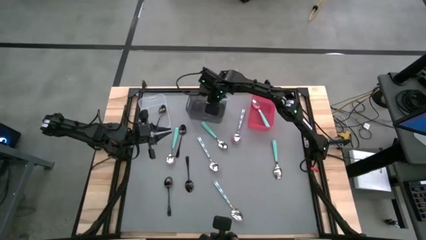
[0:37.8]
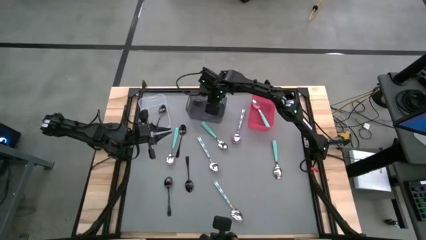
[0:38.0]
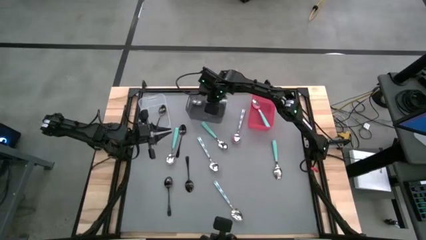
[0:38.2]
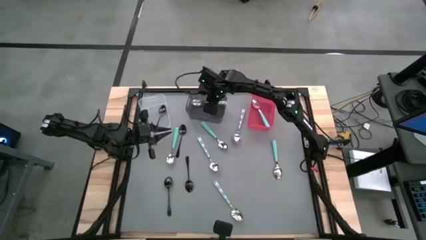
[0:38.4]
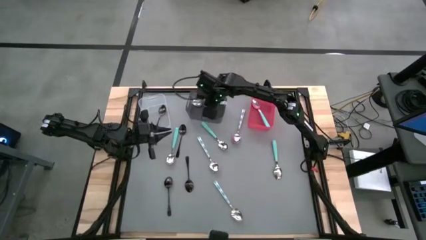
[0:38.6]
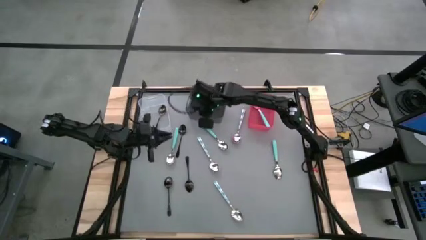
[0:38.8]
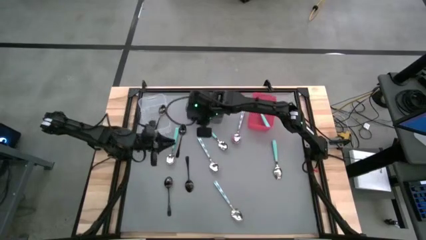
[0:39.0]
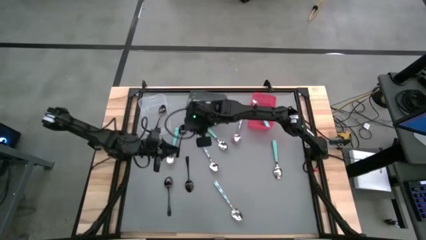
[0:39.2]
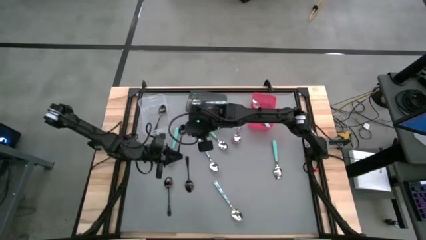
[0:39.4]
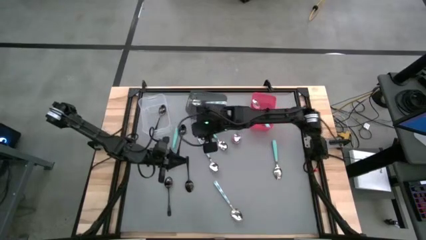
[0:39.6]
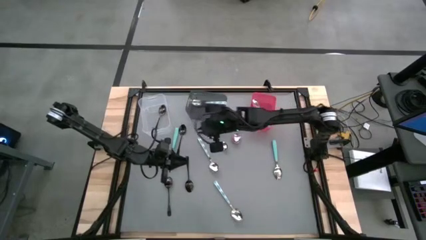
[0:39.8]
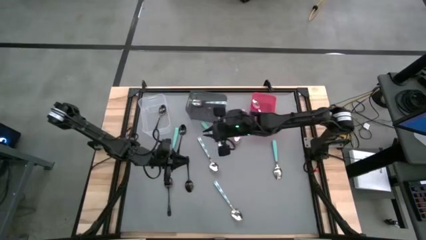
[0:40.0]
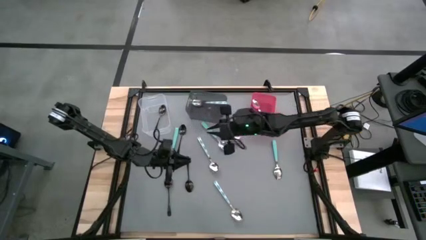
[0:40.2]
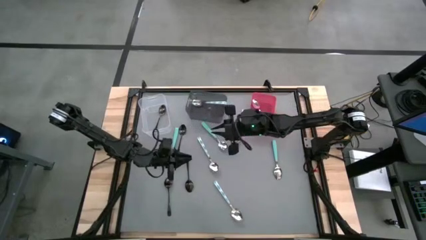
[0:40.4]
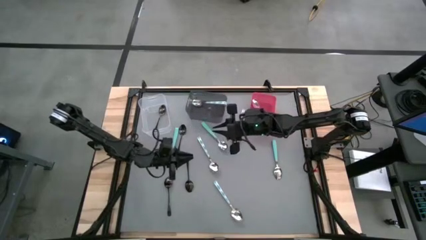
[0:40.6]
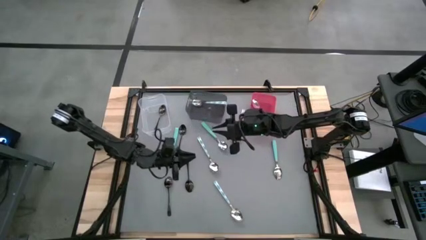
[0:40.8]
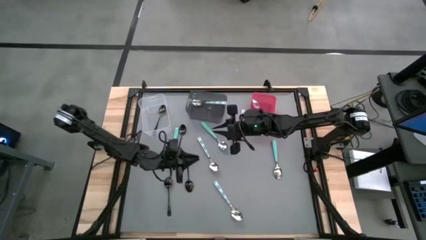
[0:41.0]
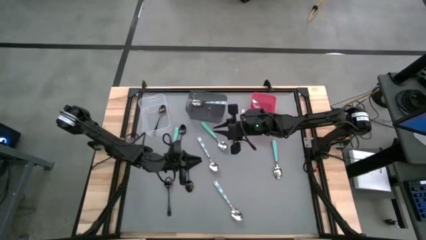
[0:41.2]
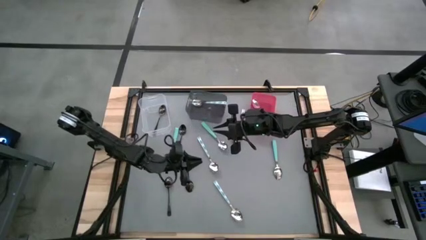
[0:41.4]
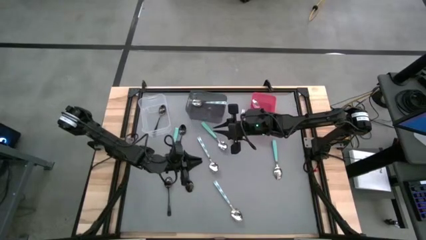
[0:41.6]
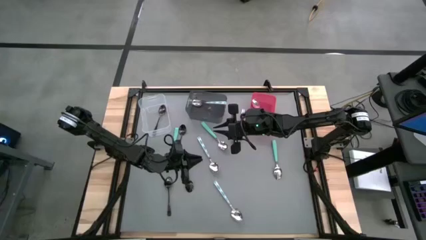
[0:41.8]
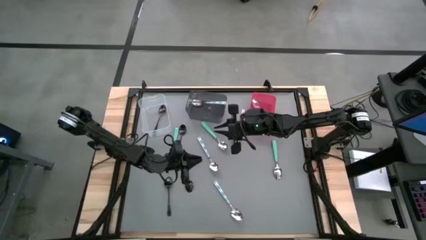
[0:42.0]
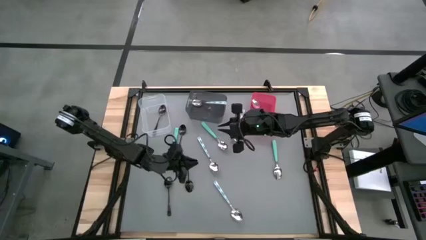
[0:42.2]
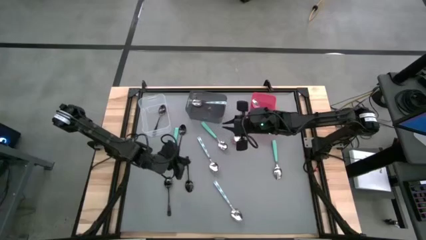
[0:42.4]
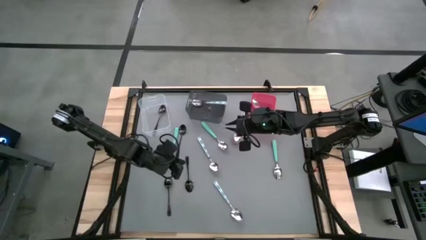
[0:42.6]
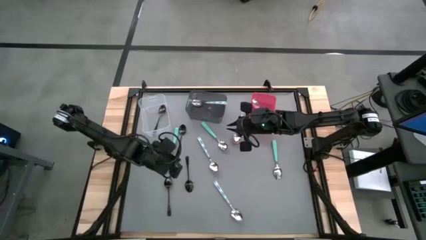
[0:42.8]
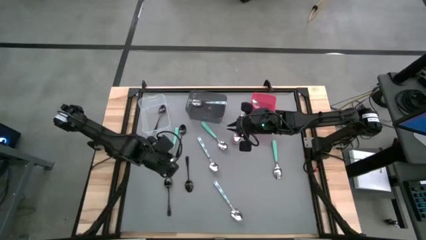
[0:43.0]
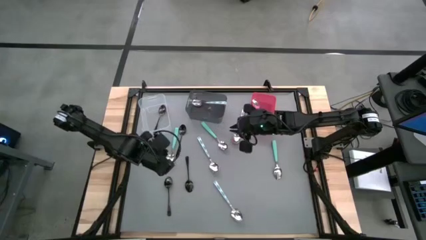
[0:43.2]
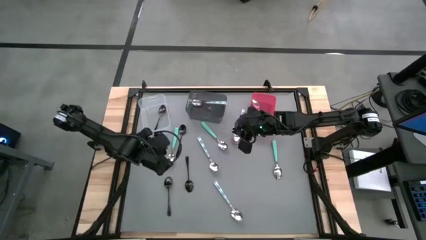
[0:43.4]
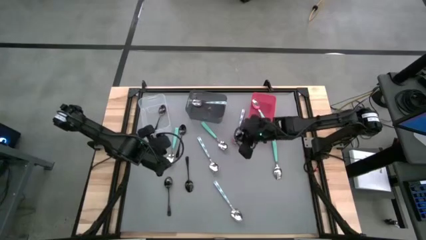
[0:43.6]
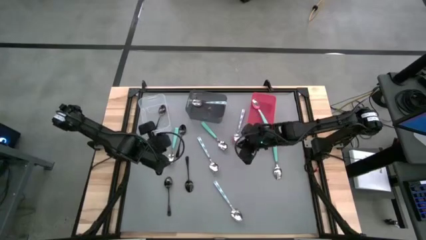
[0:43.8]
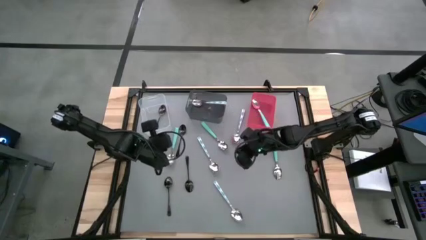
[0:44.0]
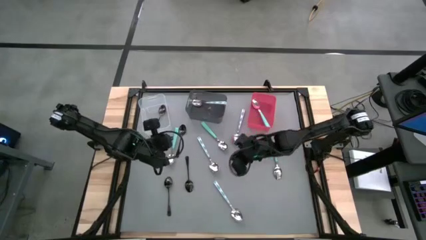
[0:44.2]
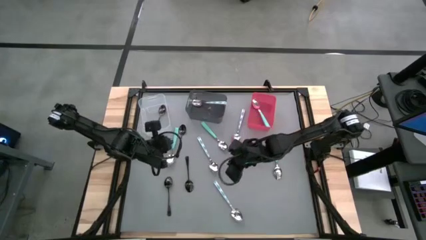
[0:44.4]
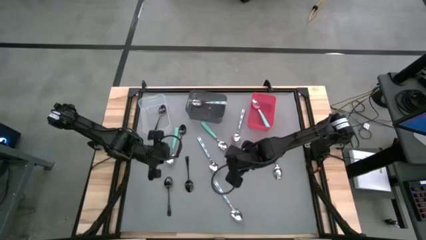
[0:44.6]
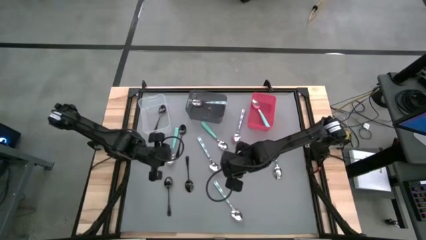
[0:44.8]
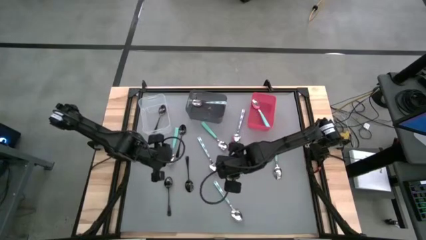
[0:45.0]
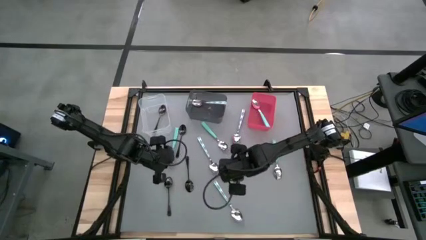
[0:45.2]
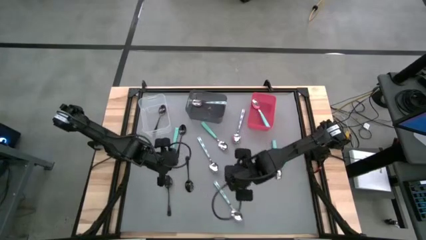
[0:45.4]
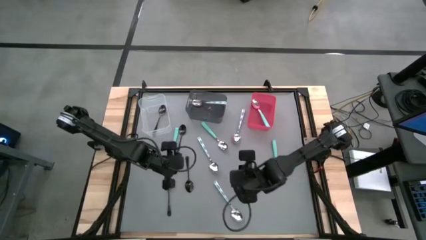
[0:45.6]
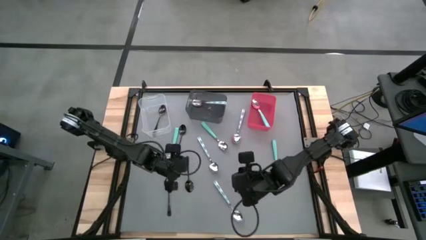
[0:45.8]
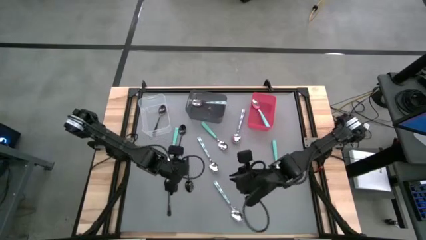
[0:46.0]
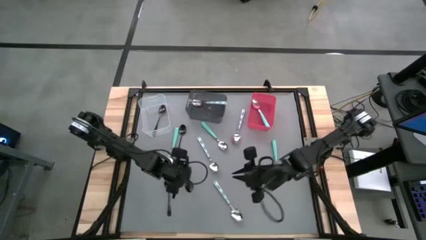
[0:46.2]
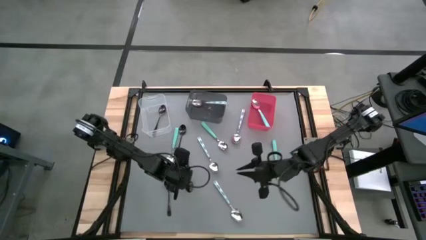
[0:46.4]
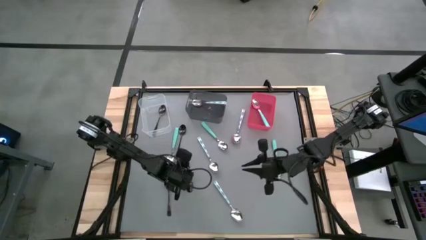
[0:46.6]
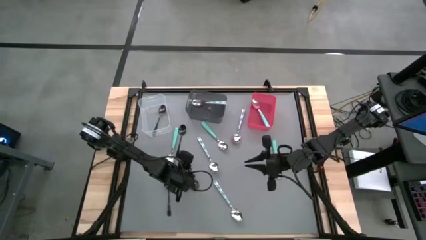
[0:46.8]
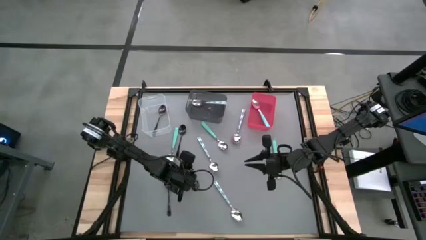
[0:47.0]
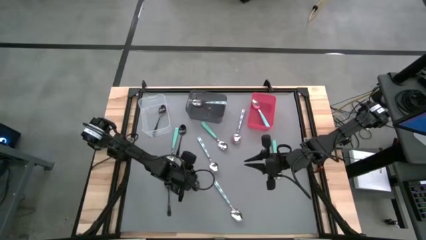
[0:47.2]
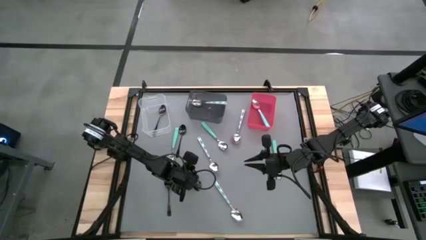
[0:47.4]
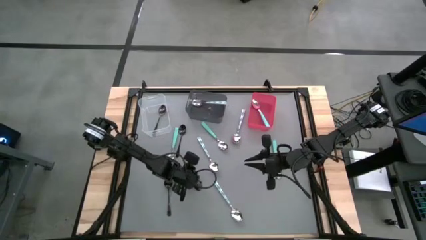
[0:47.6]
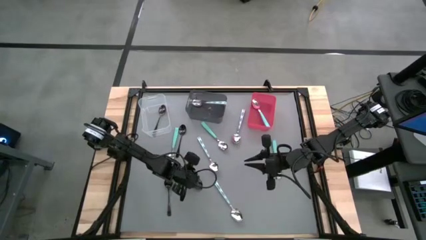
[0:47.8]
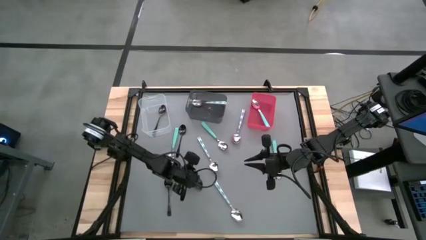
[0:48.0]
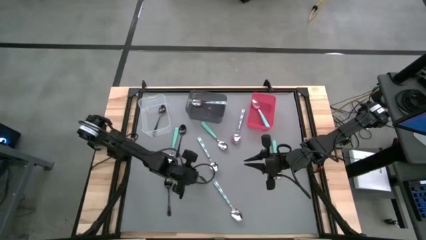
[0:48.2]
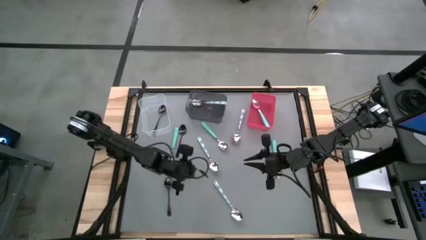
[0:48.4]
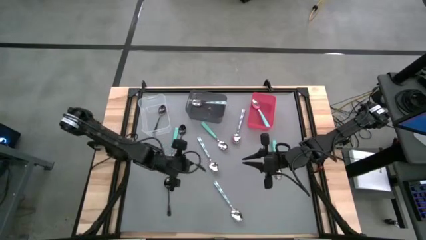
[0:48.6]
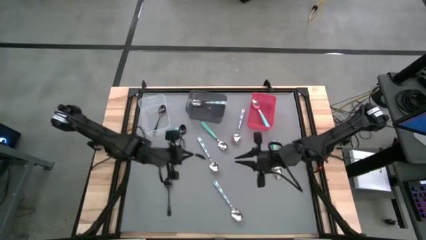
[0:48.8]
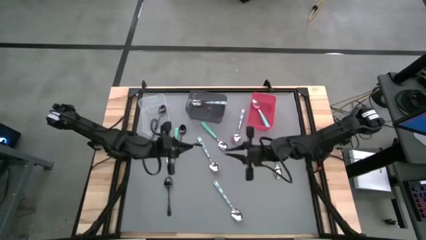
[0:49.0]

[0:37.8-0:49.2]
Task: Sort silverware by color (type)
Put the middle black spoon into the transparent bin

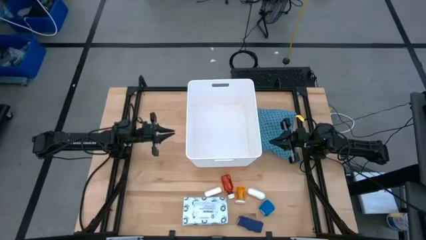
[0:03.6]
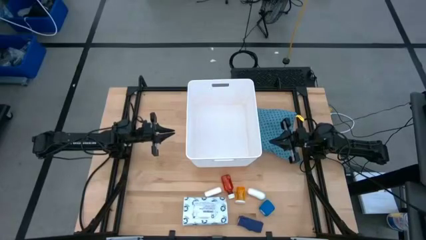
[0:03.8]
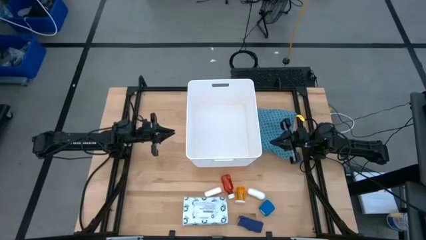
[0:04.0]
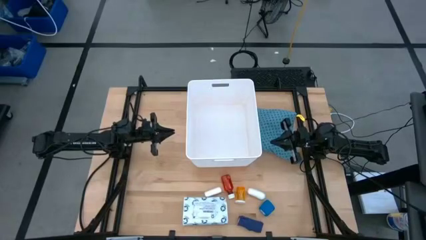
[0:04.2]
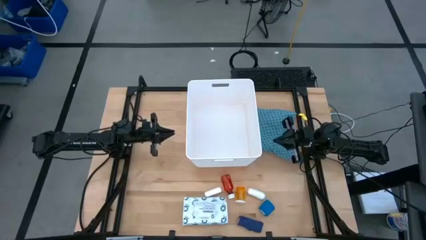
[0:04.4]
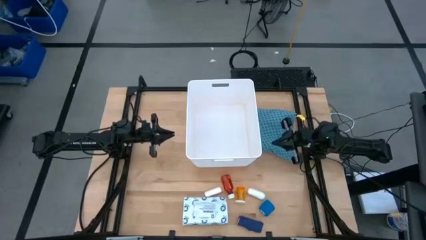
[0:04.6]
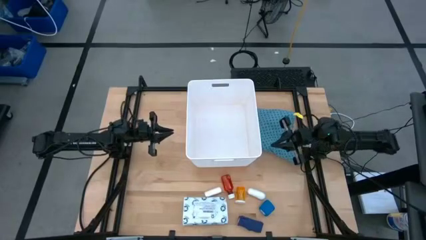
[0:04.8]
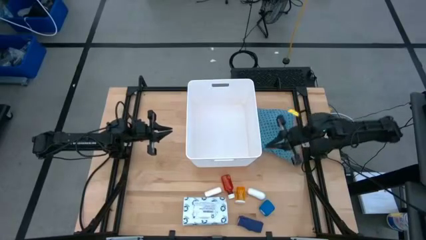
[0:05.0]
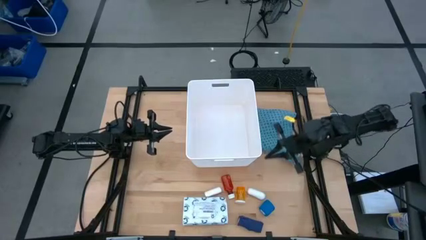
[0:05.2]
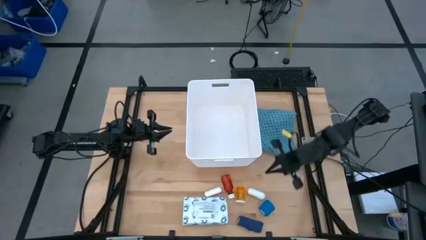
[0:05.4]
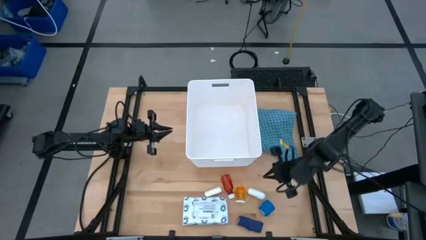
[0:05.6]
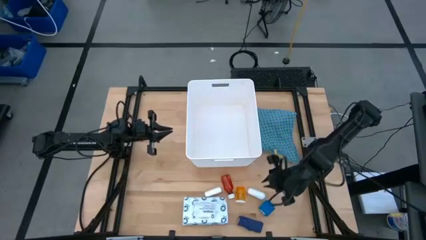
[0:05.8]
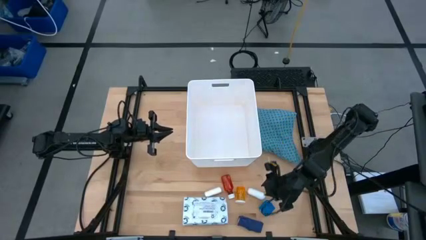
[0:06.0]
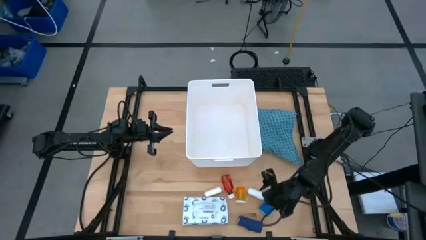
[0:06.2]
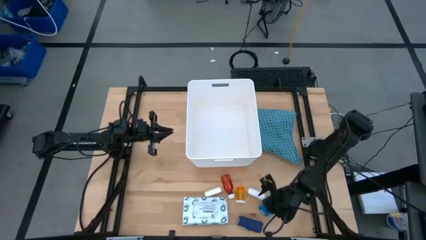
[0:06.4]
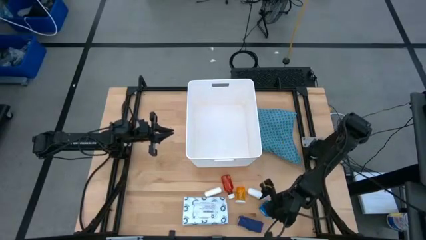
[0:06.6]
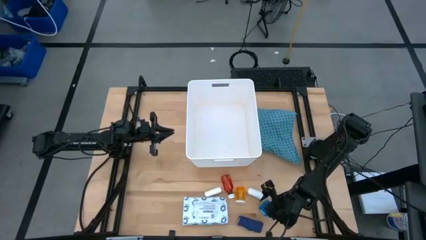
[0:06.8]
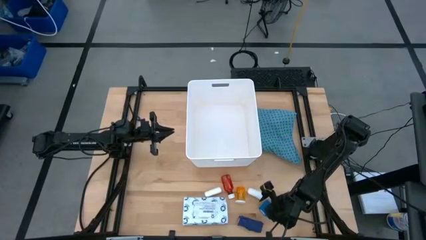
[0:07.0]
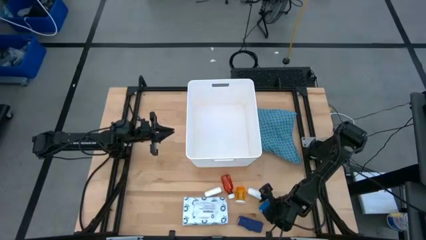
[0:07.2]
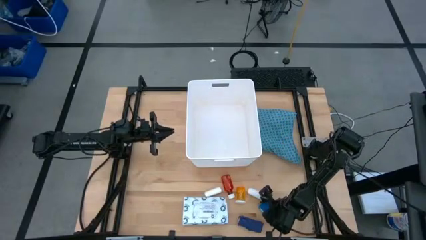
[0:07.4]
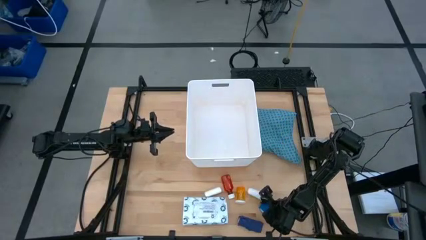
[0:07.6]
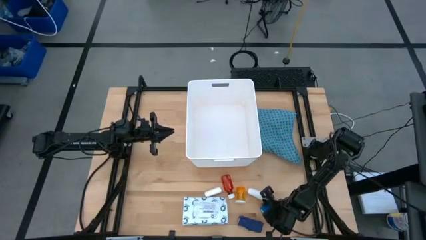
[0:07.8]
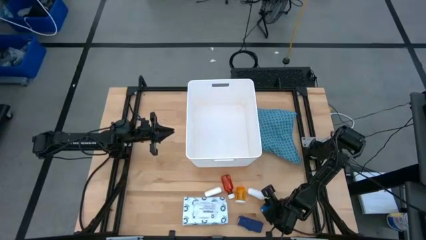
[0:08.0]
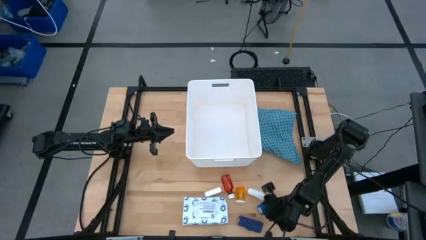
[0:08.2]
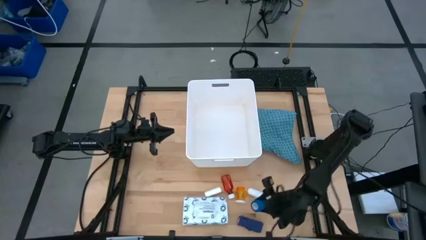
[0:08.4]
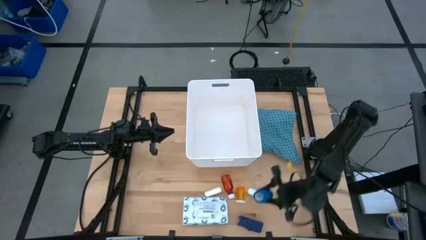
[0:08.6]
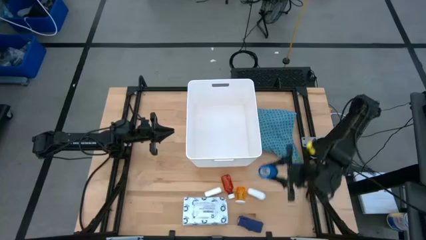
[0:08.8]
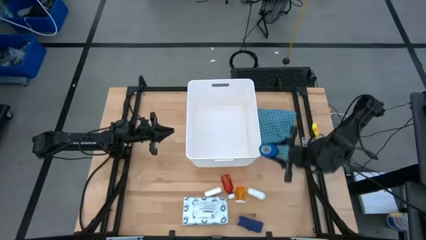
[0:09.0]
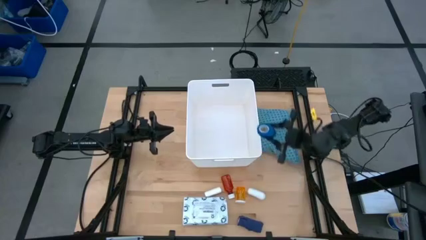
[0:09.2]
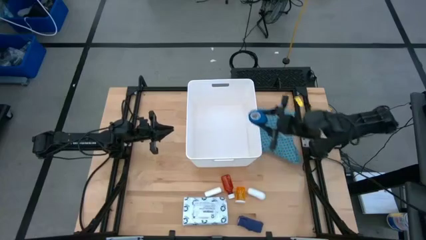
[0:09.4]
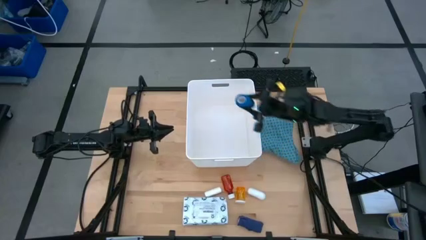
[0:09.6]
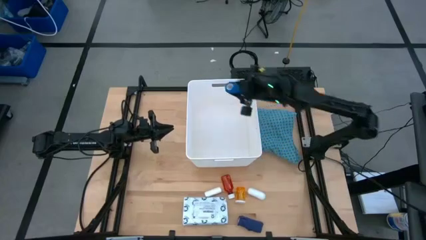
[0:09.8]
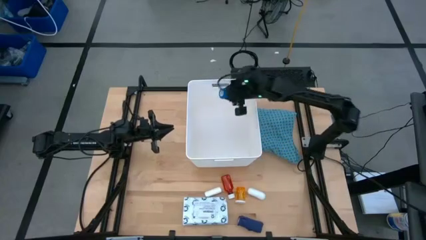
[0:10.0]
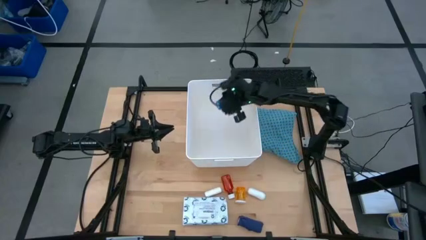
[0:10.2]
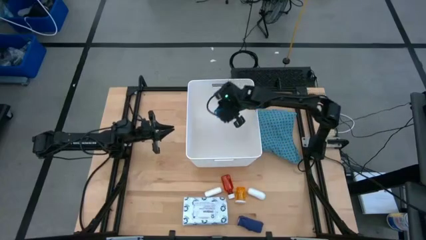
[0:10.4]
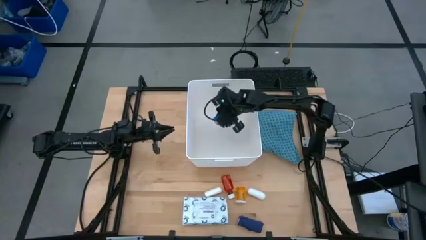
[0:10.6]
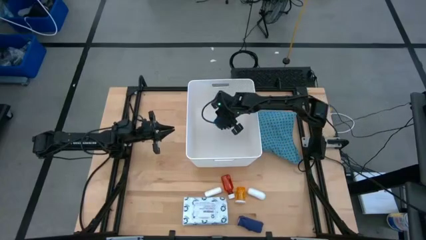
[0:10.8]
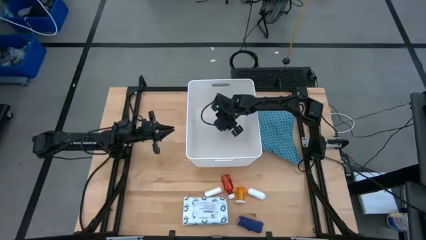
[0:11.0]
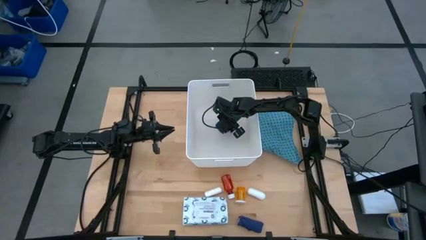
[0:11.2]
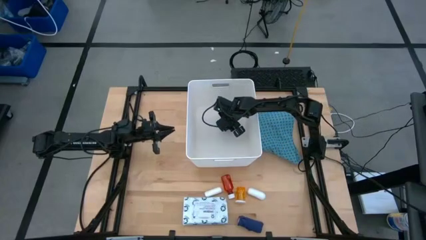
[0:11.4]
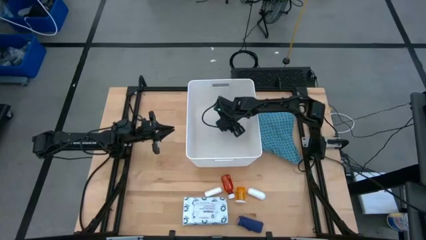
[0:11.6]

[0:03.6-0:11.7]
Task: Pick & place medical supplies in basket/bin
Put the blue bandage into the white bin
